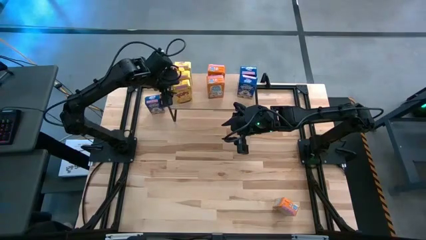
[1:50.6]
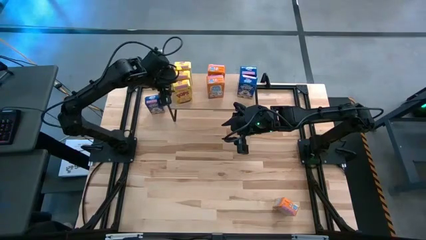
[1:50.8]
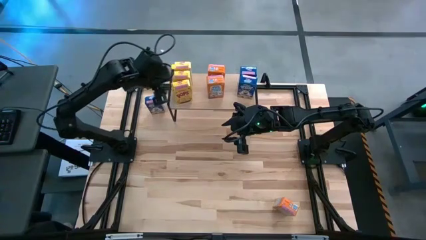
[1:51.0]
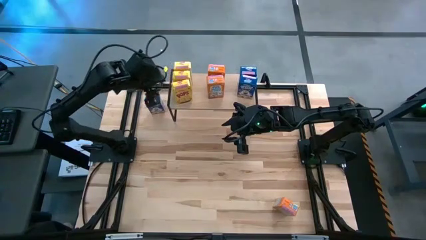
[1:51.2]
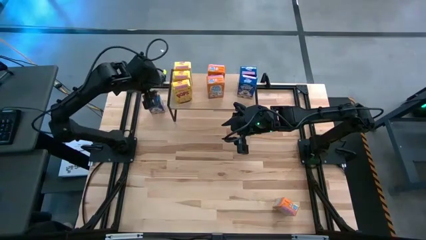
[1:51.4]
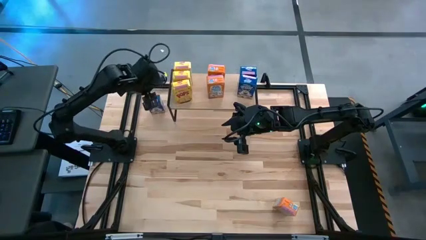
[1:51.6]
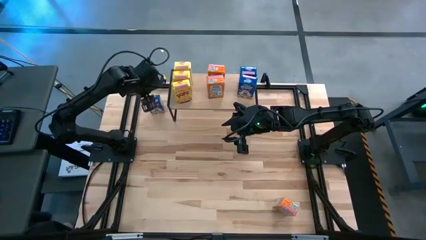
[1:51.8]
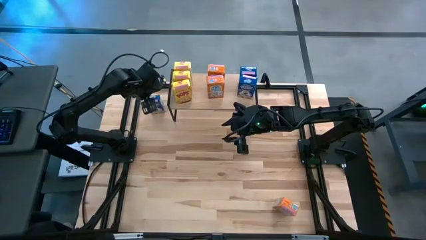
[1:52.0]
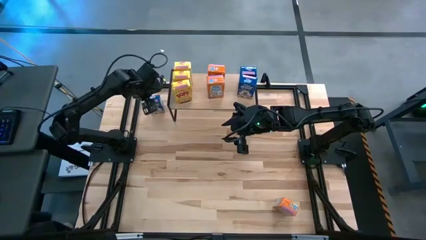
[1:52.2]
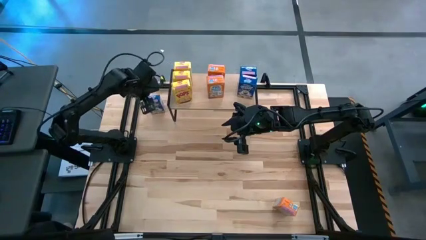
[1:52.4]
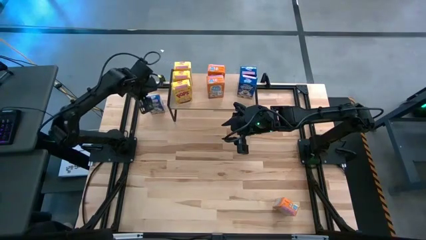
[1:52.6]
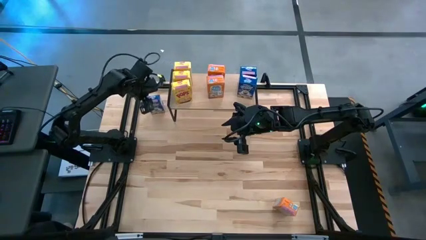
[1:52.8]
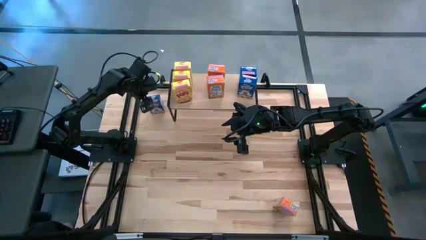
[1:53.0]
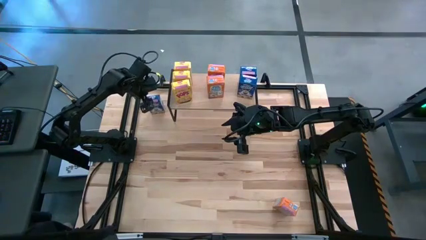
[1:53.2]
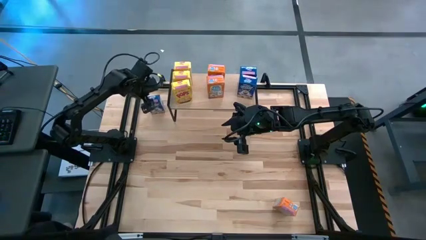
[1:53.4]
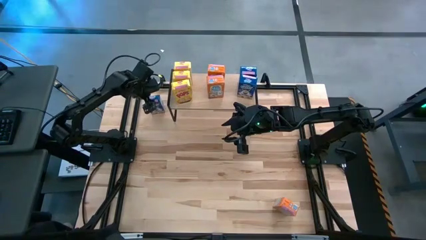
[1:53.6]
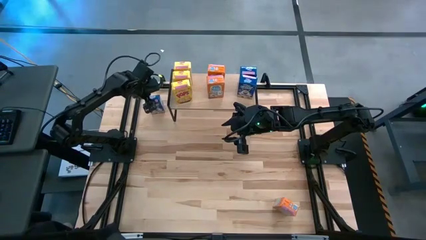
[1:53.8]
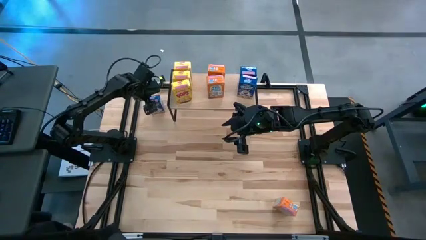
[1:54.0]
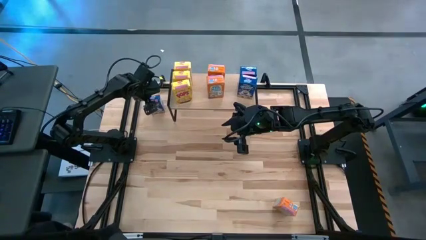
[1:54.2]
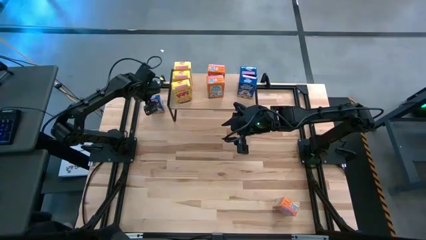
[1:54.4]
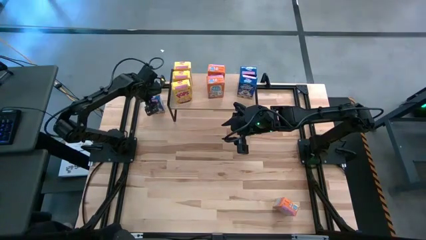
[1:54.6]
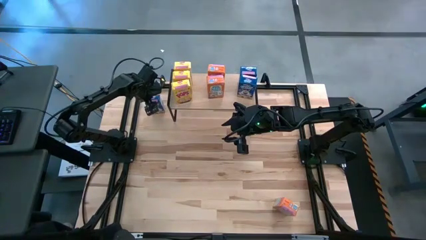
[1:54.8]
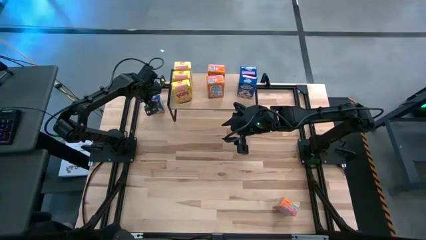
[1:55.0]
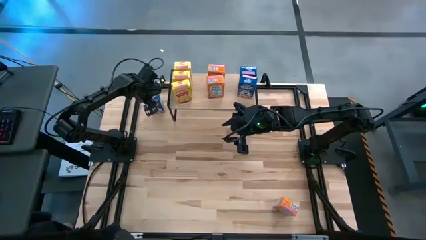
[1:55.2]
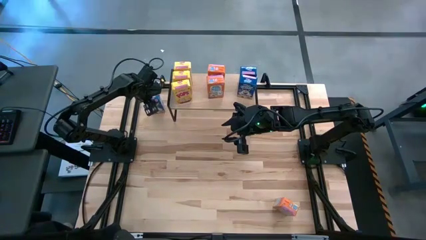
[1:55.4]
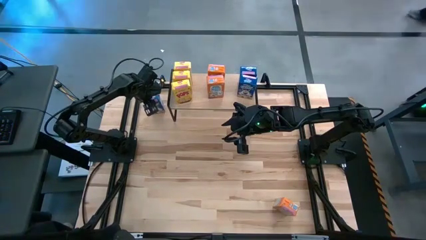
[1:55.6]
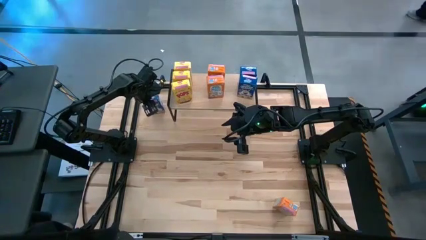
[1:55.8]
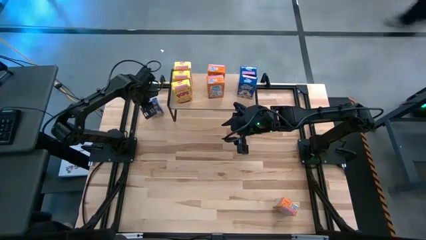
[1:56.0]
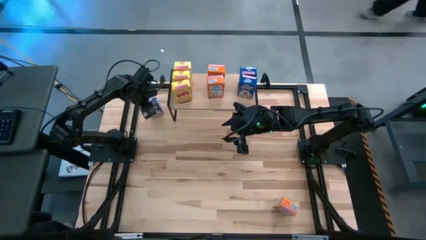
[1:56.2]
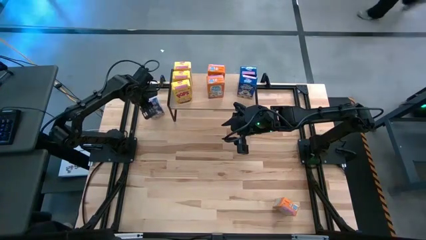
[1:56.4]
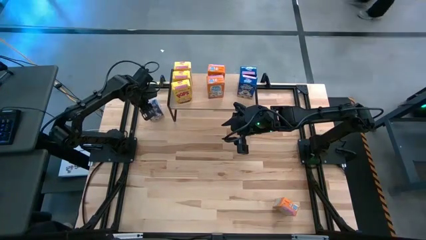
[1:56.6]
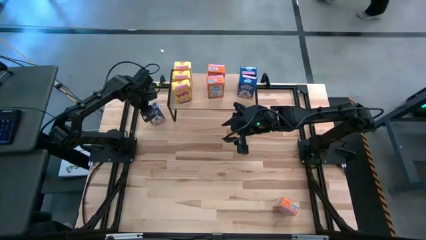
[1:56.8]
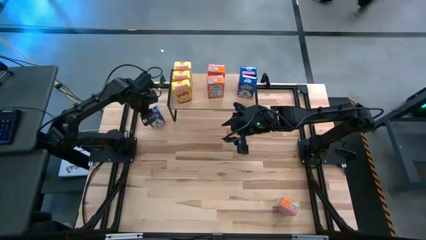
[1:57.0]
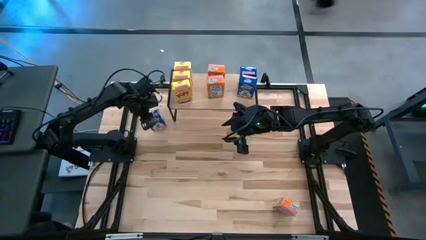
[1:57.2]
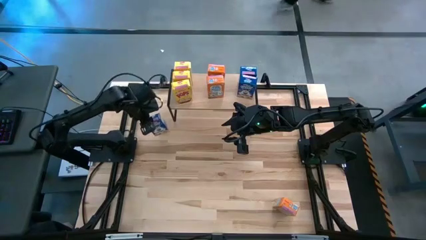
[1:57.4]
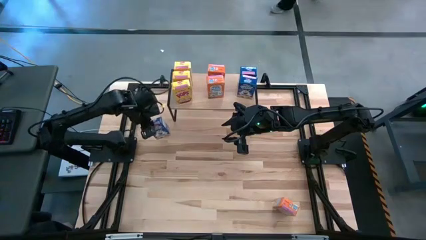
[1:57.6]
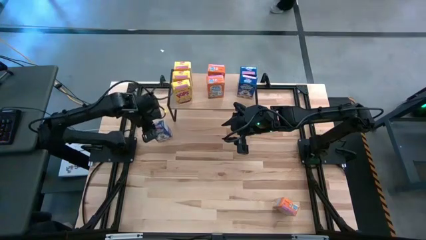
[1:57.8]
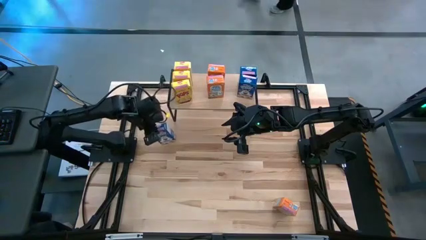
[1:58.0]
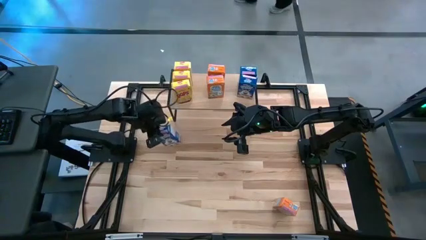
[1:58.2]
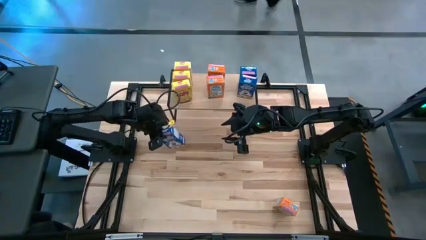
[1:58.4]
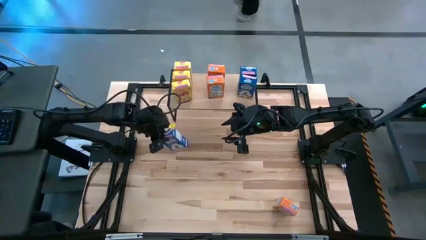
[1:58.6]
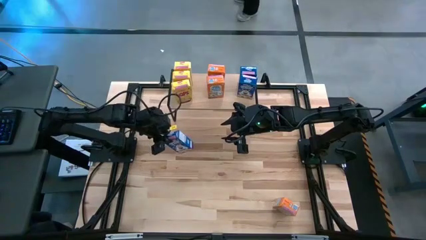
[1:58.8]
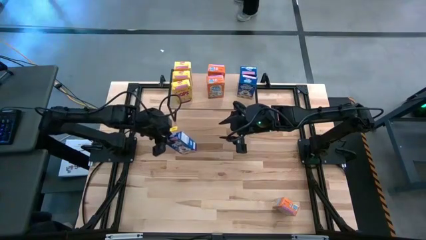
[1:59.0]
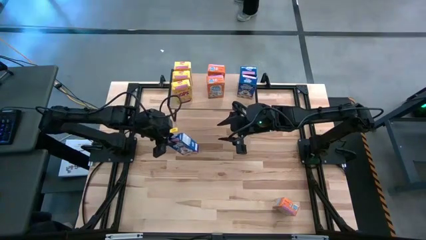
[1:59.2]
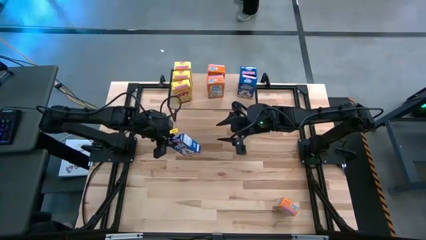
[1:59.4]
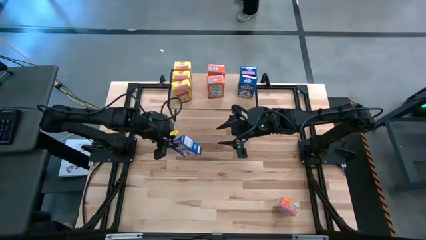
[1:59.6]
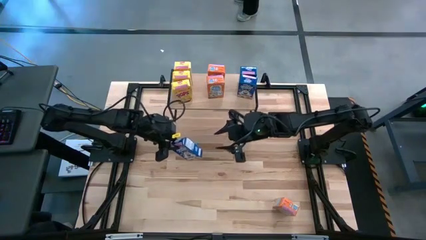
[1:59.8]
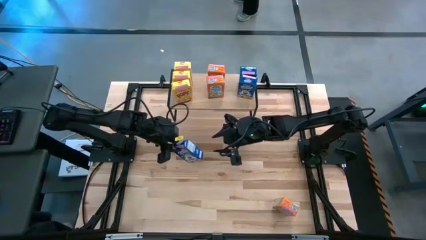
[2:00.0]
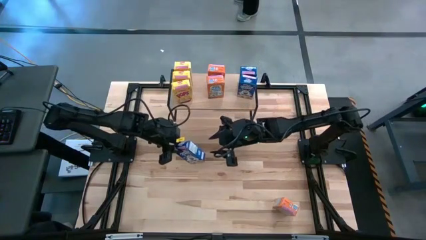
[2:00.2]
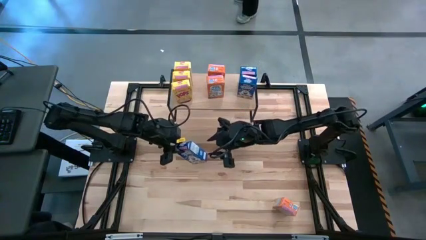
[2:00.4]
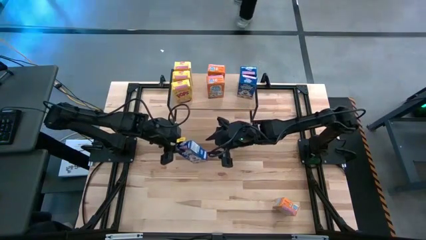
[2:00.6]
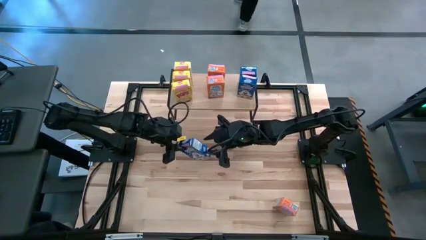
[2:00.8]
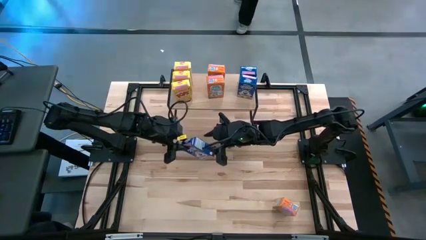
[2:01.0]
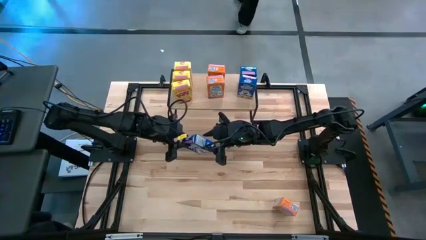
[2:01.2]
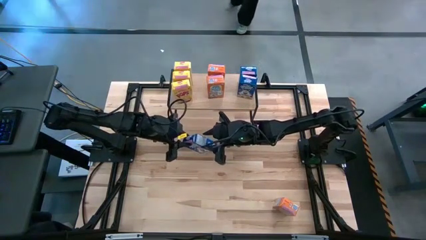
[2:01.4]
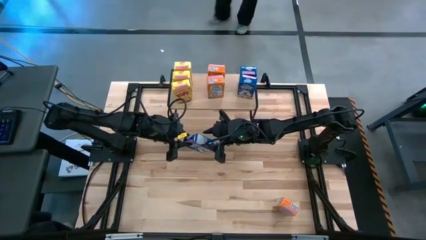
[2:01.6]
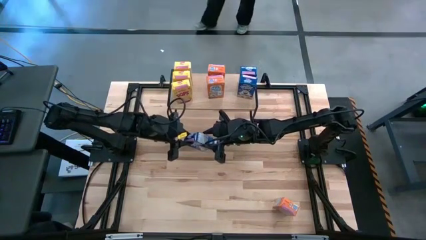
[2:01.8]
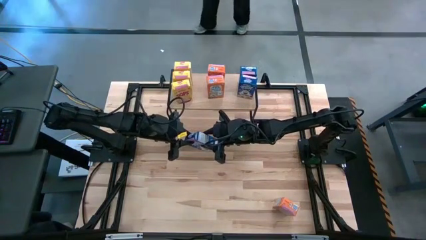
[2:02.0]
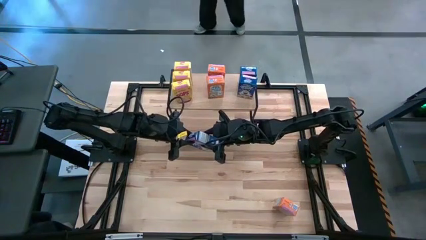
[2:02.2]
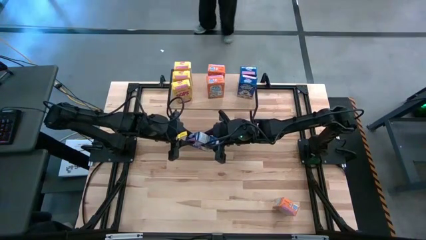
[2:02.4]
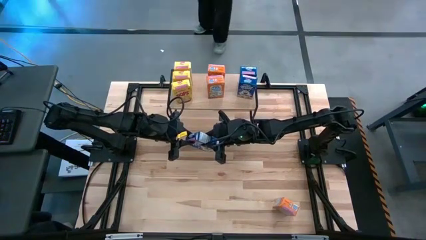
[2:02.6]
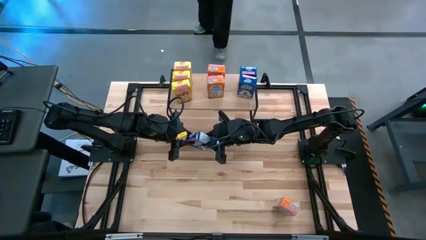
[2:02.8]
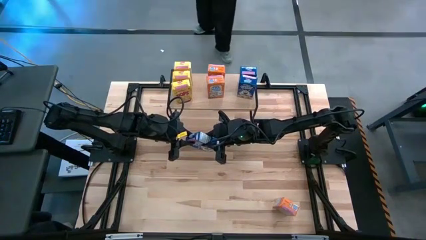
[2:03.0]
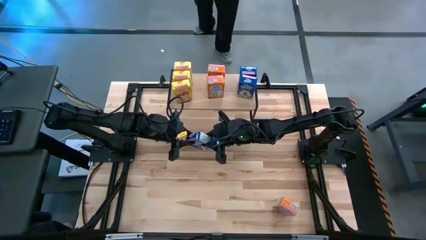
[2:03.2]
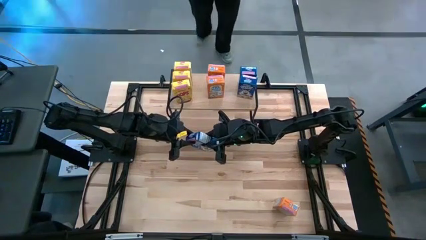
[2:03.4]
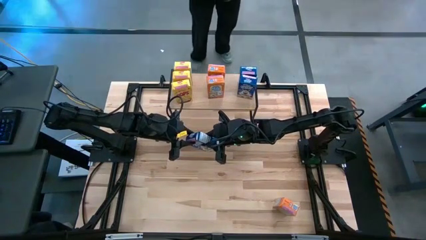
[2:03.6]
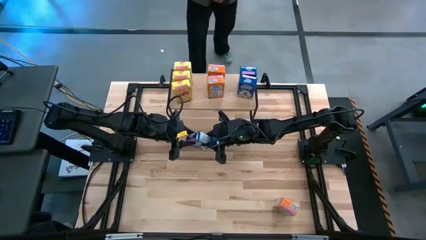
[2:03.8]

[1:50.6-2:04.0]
Task: Stack cereal on shelf
Put the blue cereal box on the shelf aligned with the other blue cereal boxes
